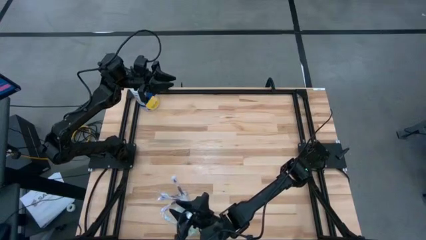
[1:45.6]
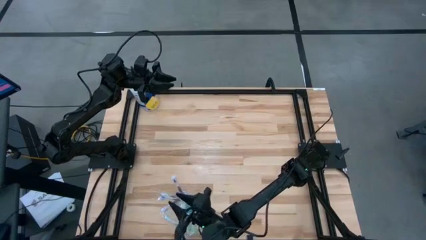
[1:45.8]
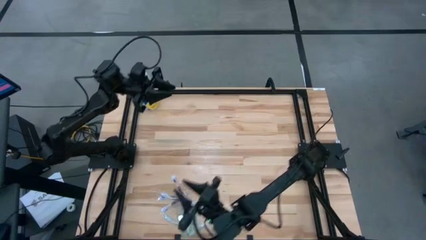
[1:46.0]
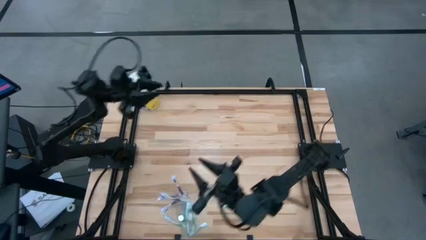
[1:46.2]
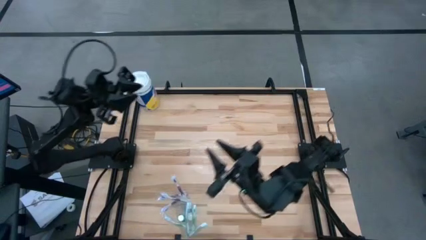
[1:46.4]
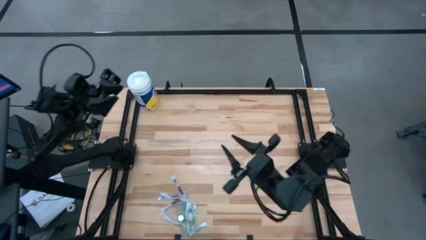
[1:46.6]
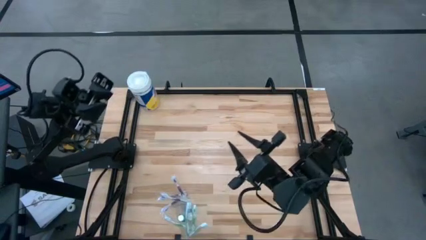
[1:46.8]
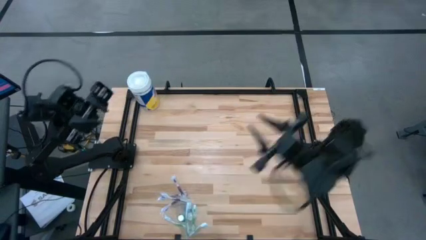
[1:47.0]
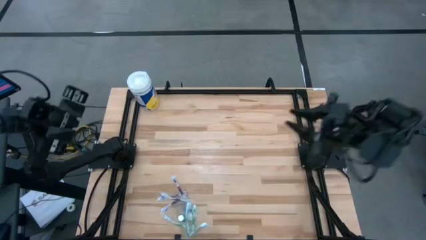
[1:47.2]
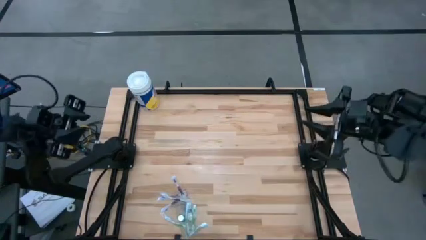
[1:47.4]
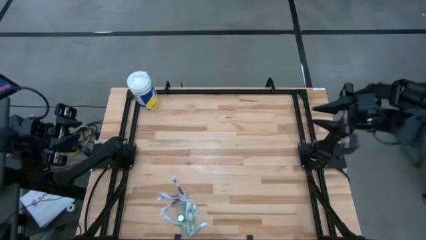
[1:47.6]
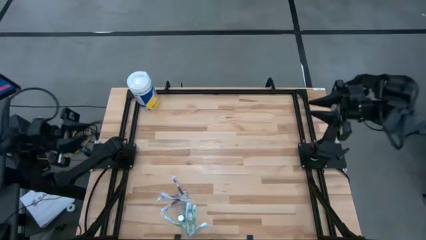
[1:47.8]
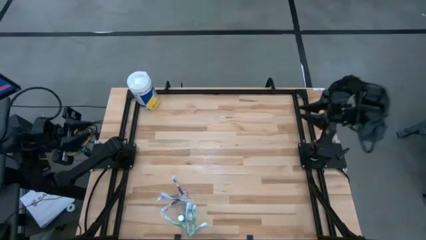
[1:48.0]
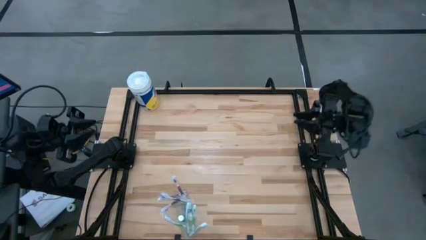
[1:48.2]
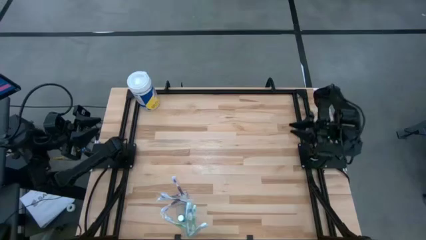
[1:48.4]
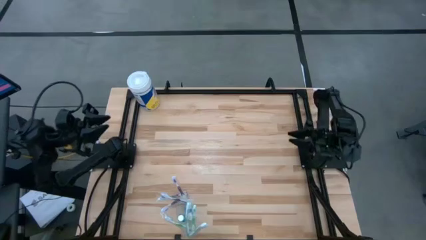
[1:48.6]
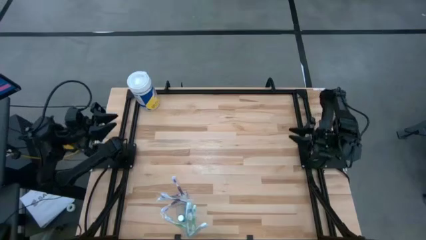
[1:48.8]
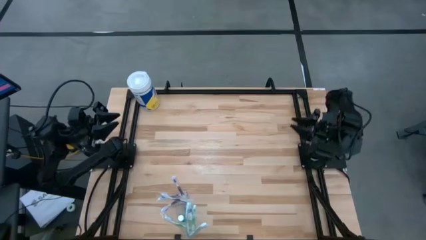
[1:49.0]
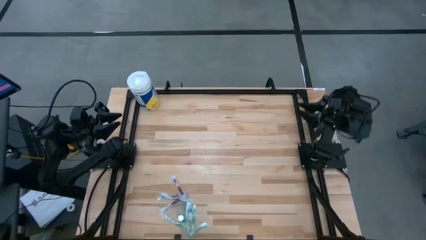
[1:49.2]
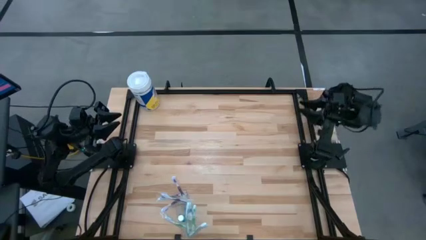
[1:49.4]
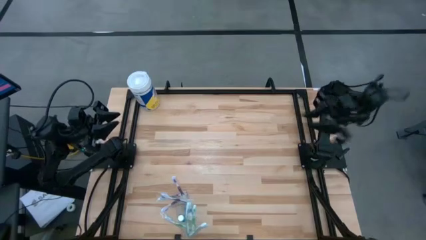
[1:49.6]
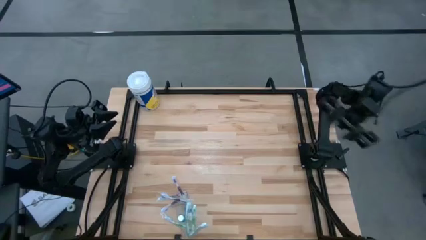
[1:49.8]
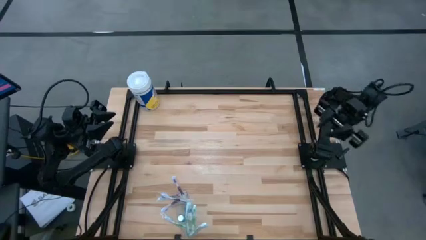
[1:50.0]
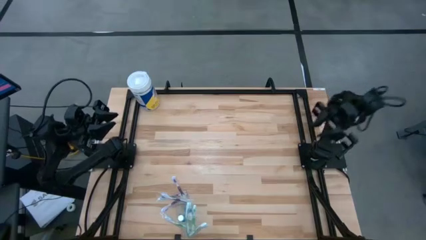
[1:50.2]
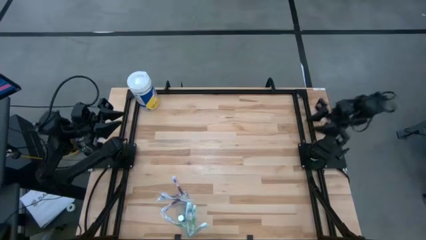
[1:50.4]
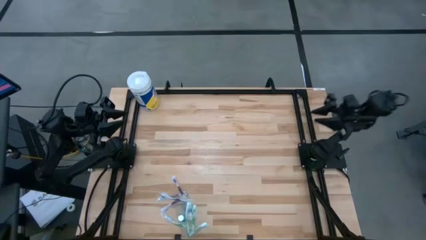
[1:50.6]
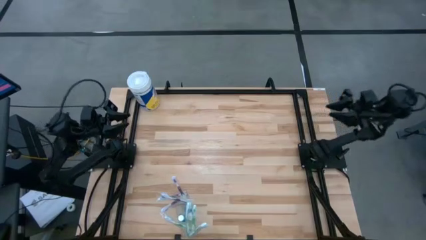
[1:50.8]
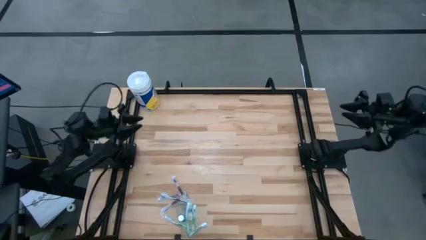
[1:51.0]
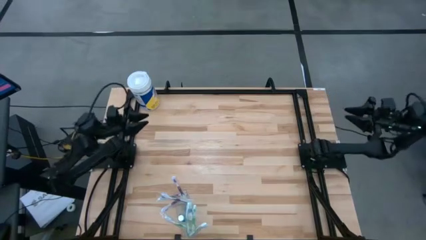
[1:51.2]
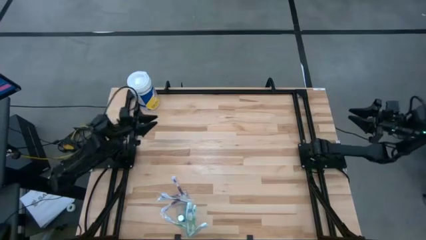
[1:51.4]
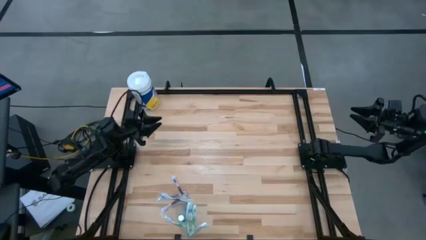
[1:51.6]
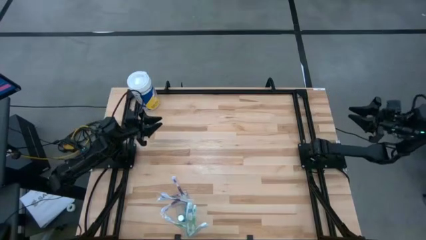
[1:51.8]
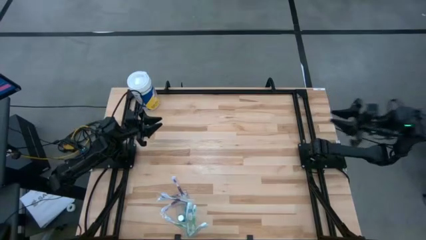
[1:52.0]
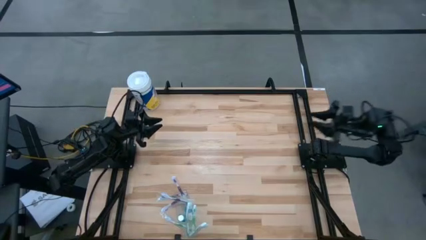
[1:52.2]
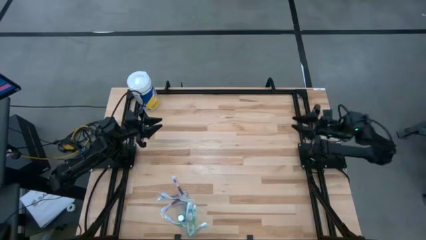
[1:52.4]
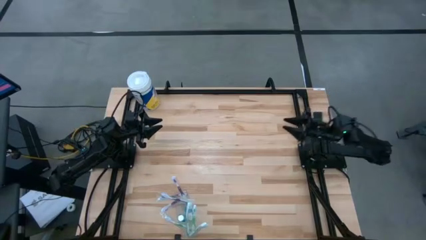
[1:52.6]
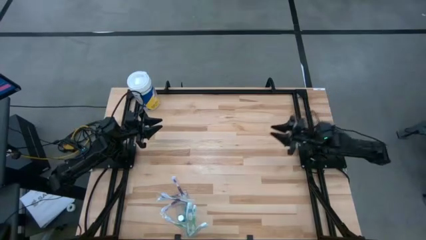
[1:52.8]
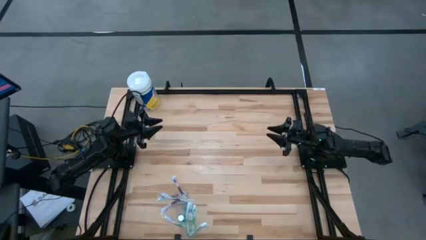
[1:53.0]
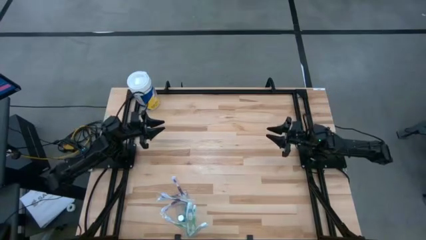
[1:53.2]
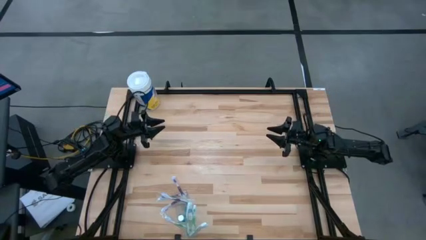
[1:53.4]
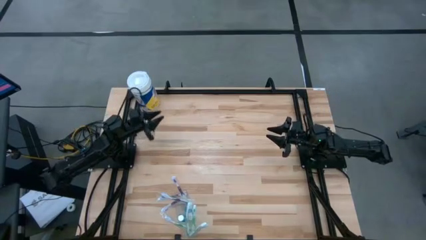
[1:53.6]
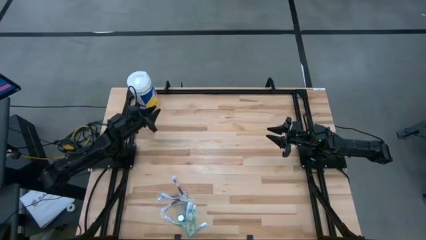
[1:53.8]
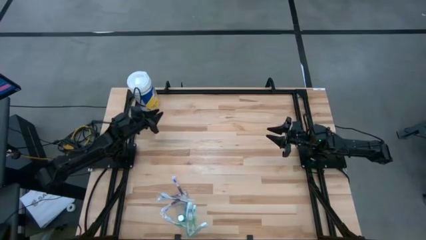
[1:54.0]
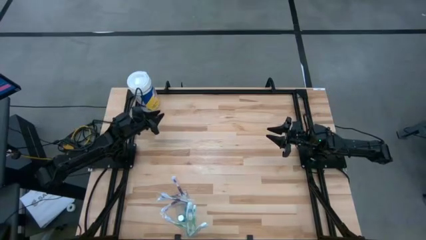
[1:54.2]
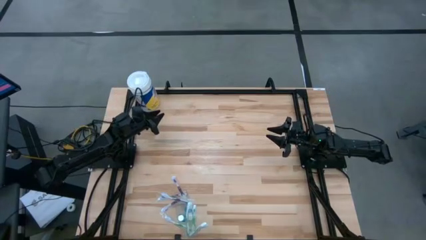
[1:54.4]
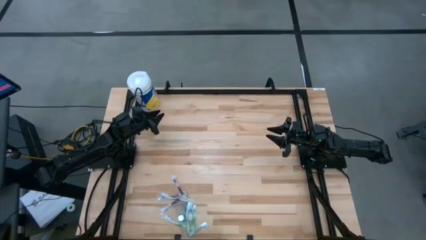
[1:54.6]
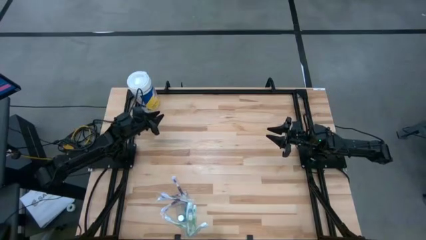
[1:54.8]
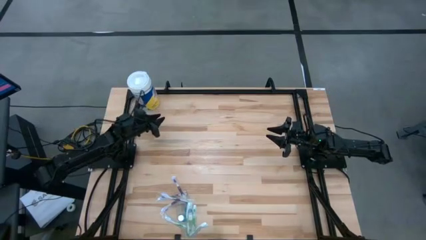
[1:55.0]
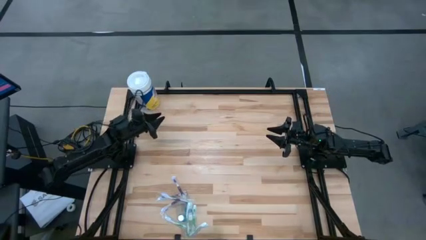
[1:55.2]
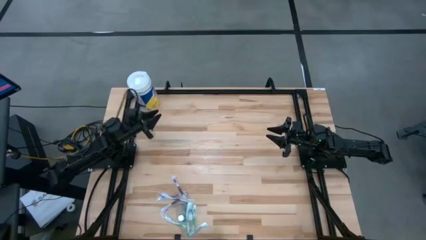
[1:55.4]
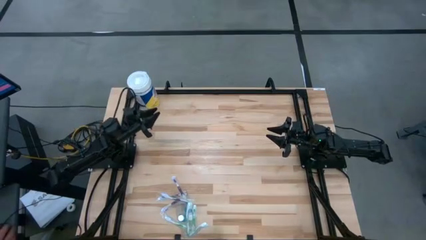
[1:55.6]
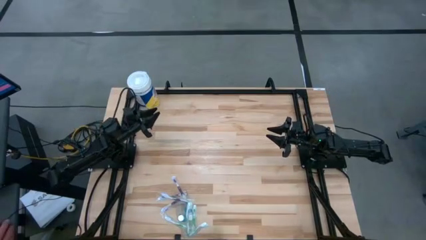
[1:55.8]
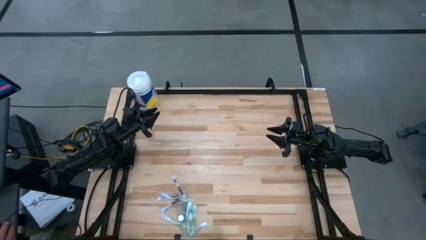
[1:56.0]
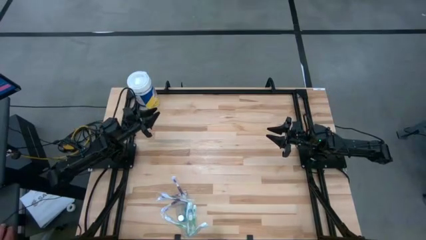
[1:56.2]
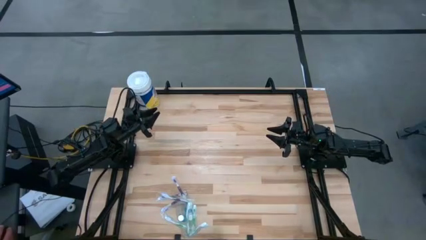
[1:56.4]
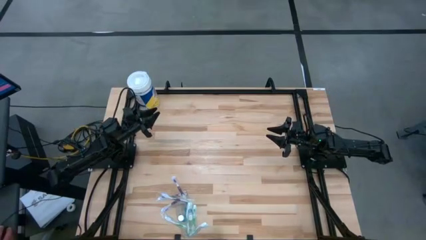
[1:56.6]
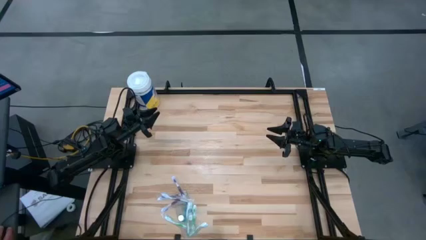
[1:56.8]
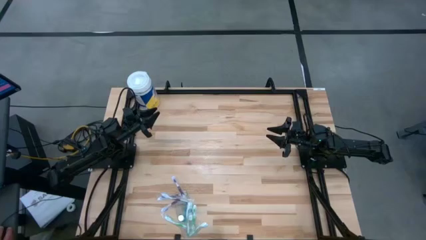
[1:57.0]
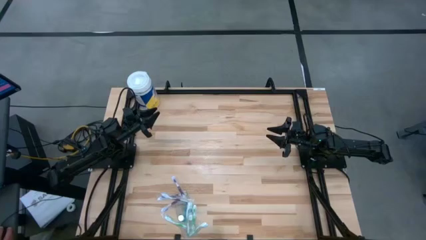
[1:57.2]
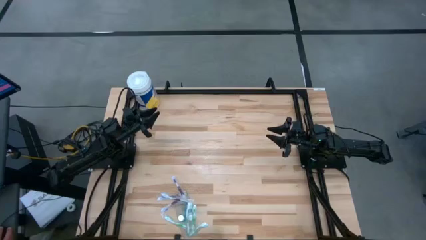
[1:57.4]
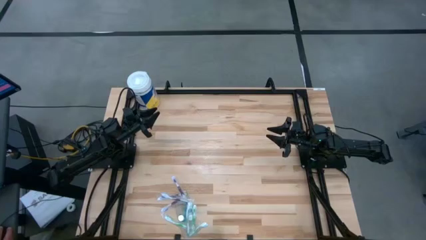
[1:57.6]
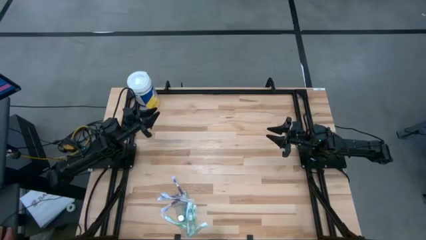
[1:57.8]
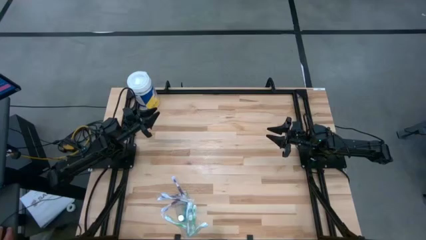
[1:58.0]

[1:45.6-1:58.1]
Task: Pick & Place toothbrushing station
Return to Home Position

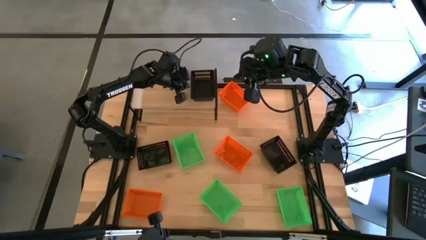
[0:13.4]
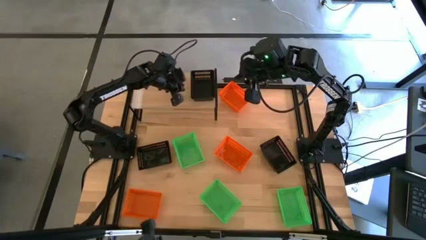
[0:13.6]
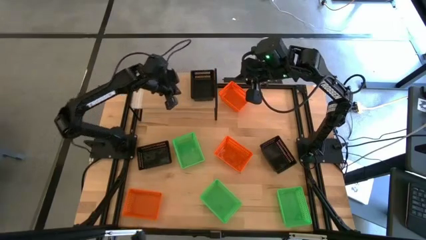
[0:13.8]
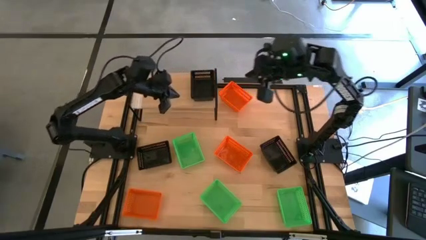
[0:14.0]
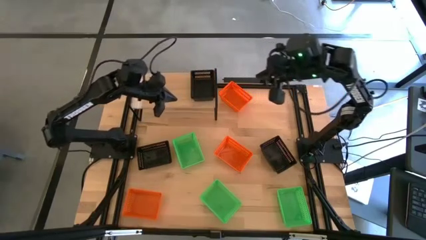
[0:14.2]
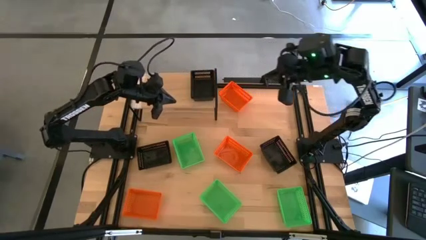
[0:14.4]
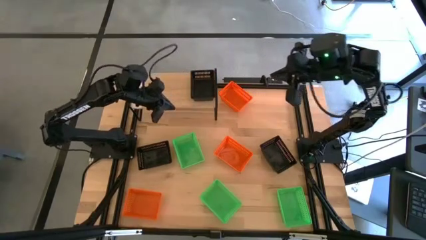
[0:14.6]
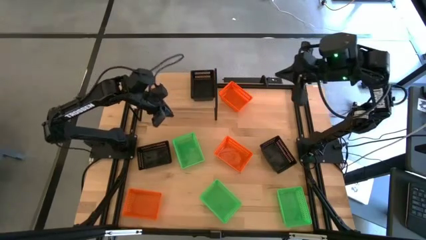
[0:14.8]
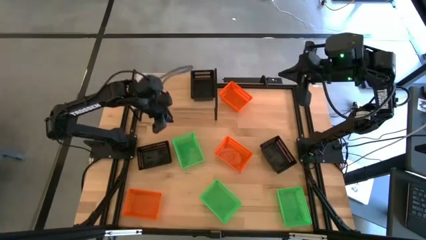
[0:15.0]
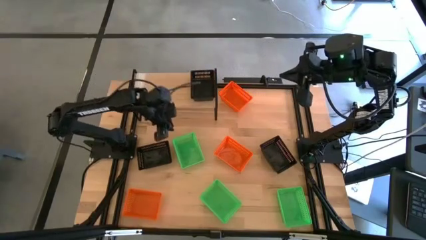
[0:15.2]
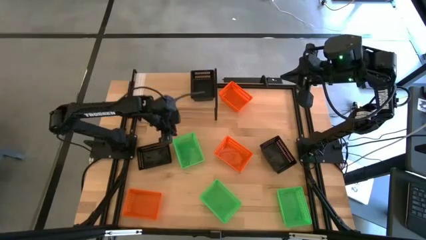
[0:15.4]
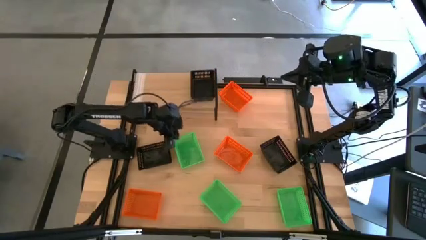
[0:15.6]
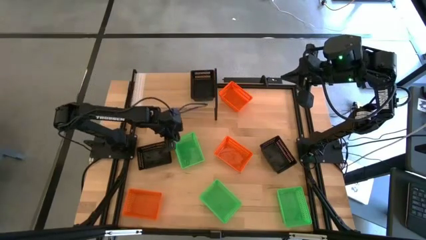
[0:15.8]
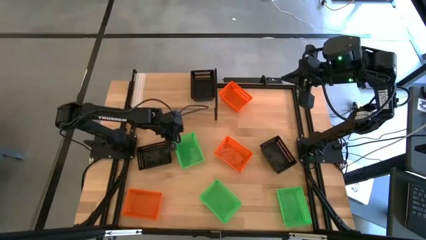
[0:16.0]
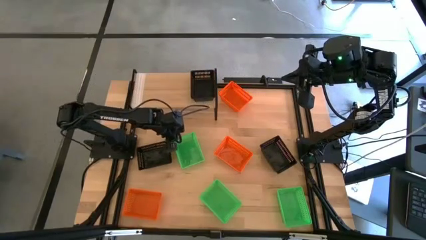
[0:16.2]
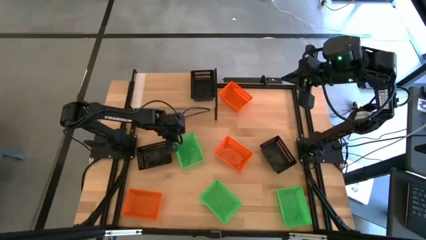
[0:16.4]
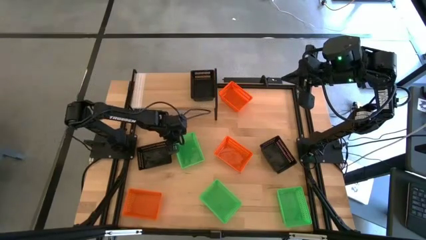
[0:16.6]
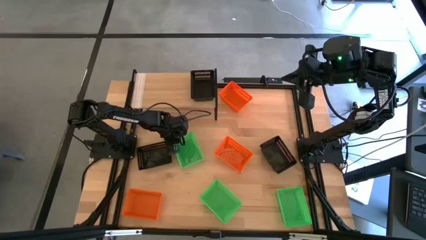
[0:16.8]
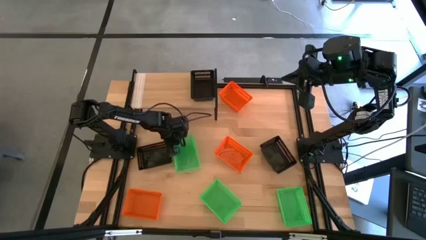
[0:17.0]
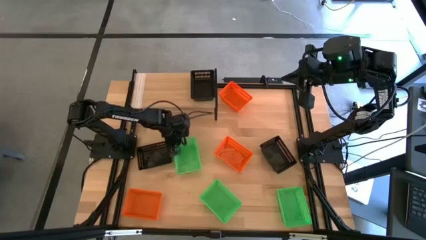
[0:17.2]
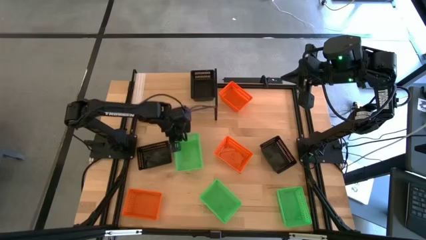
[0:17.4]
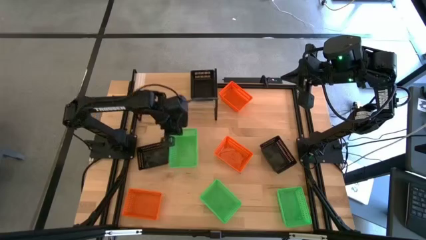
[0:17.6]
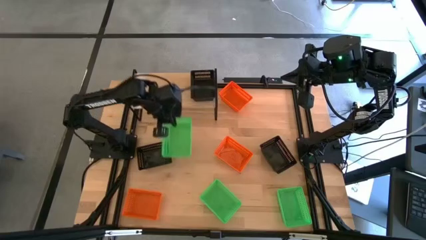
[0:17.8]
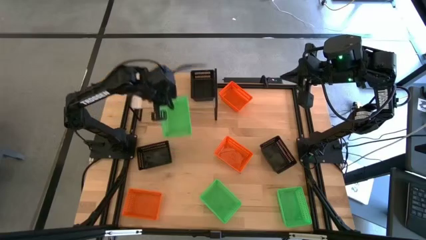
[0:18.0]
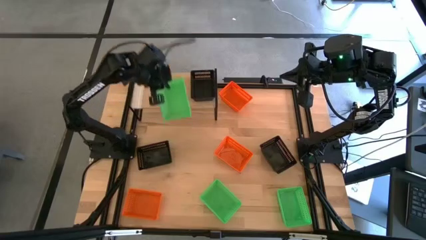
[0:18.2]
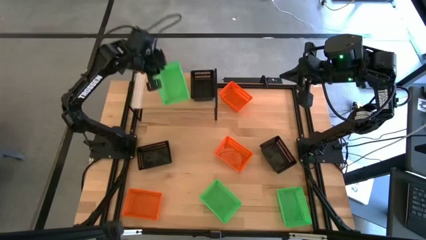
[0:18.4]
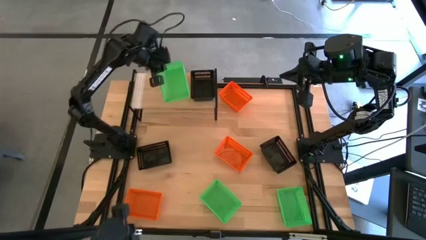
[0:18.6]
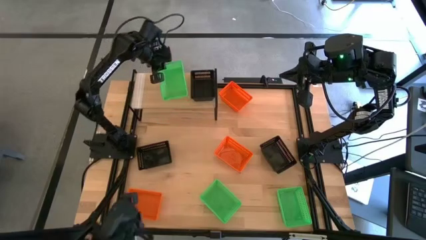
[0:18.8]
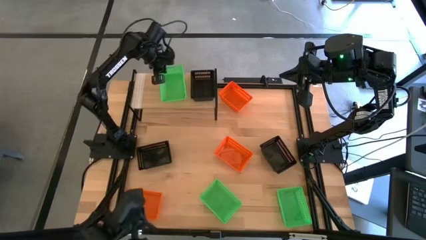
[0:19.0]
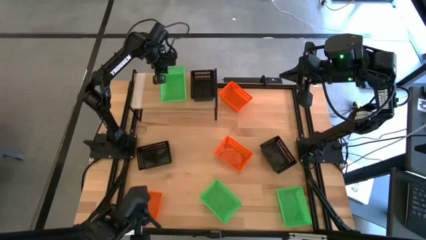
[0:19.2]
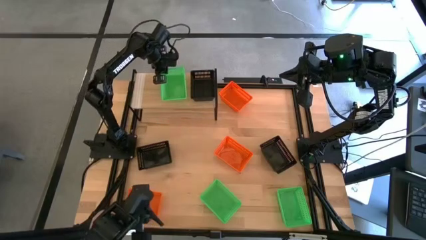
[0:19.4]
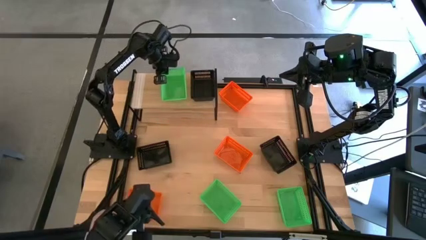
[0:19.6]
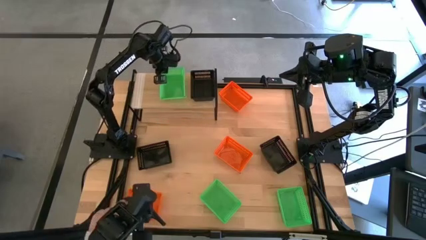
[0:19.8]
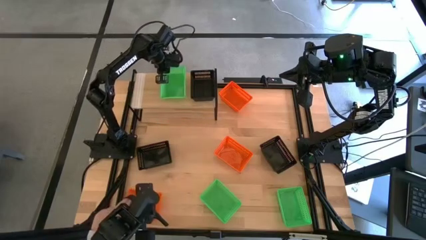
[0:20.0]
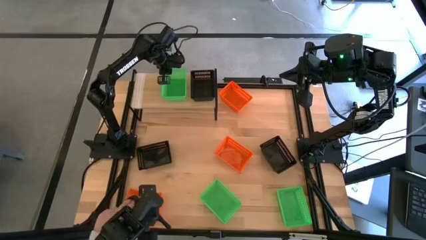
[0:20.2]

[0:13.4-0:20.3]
Task: Stack baskets on shelf by color
Put the top left green bin on the shelf
